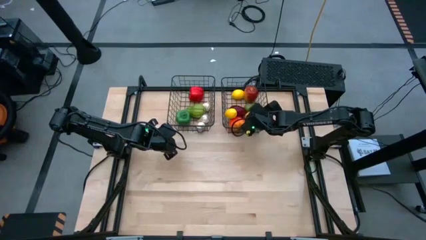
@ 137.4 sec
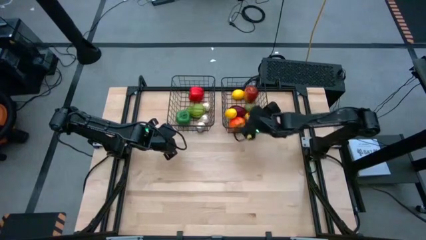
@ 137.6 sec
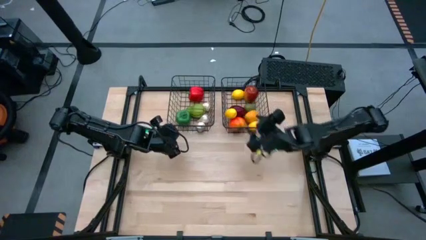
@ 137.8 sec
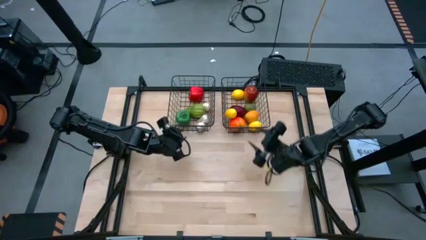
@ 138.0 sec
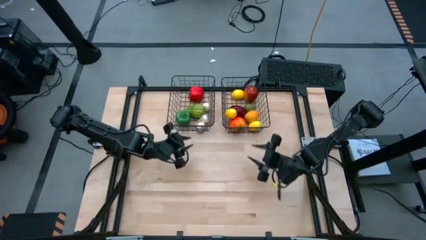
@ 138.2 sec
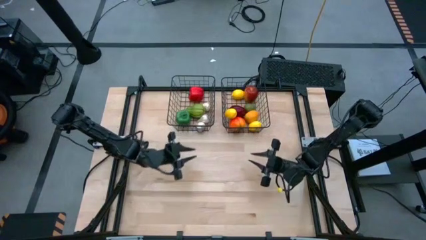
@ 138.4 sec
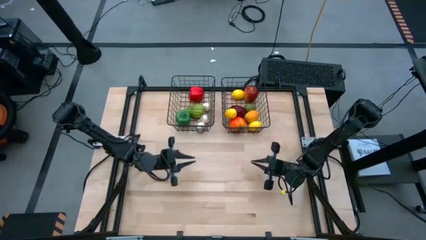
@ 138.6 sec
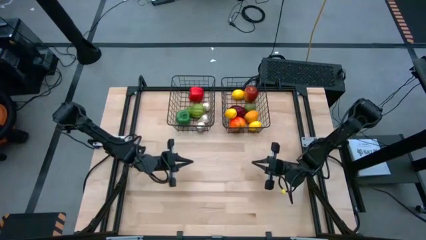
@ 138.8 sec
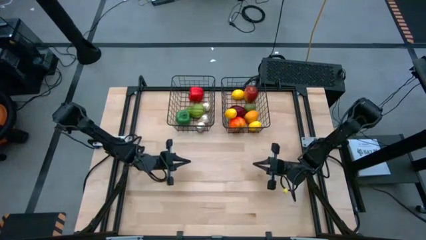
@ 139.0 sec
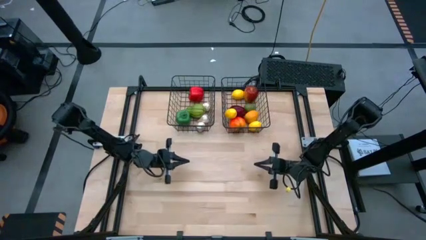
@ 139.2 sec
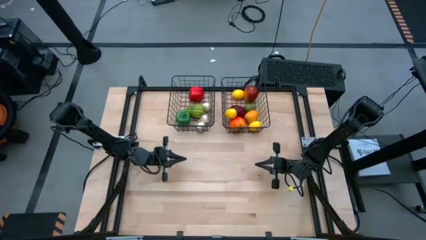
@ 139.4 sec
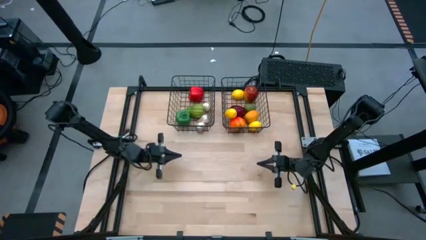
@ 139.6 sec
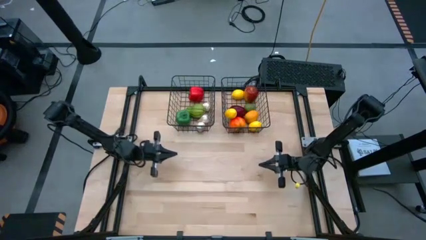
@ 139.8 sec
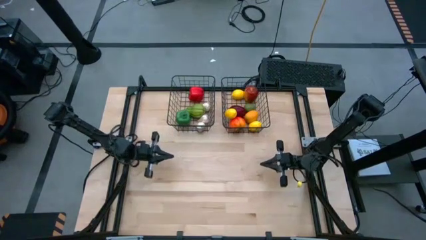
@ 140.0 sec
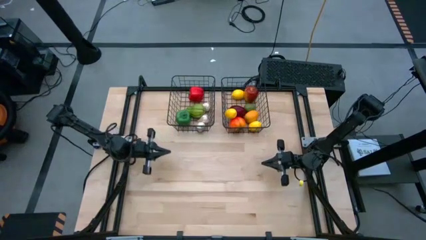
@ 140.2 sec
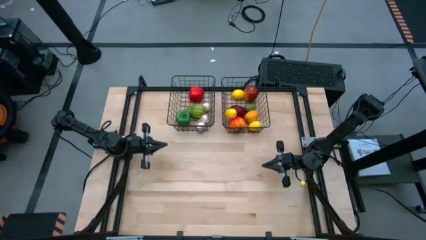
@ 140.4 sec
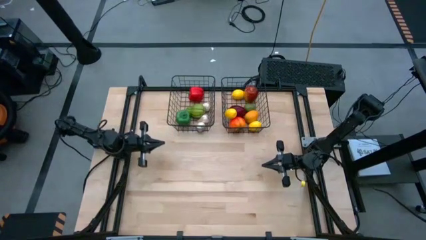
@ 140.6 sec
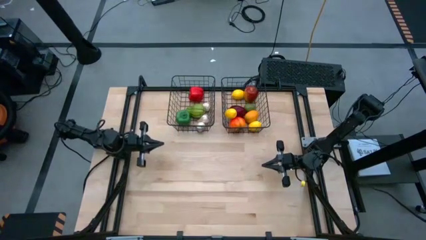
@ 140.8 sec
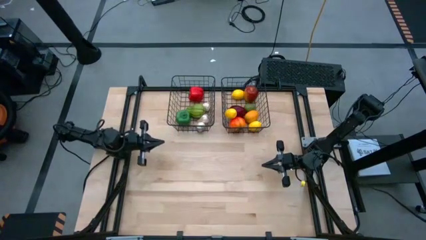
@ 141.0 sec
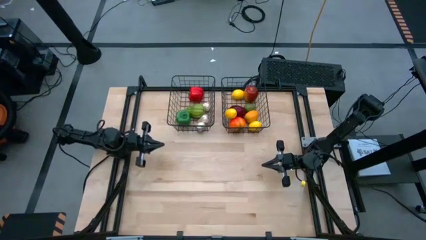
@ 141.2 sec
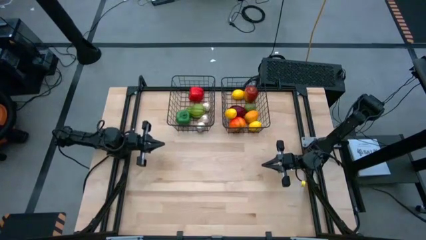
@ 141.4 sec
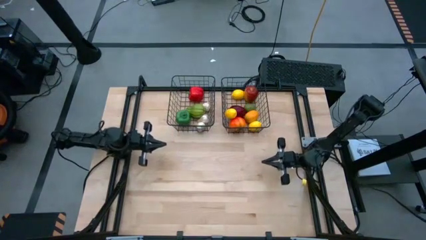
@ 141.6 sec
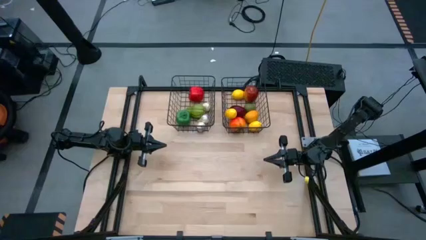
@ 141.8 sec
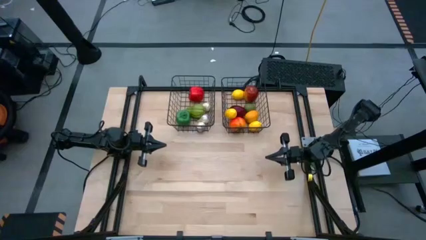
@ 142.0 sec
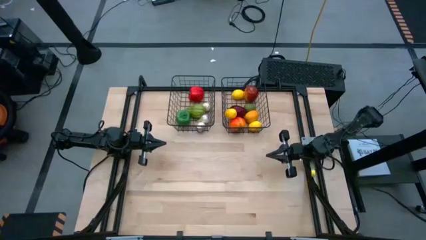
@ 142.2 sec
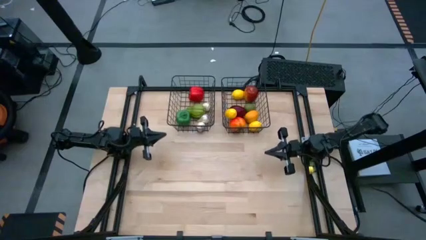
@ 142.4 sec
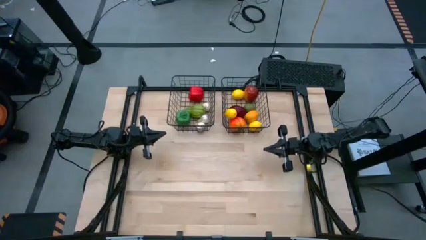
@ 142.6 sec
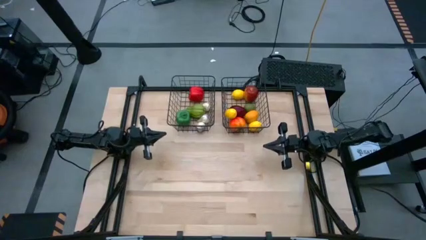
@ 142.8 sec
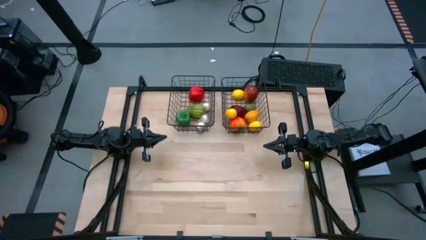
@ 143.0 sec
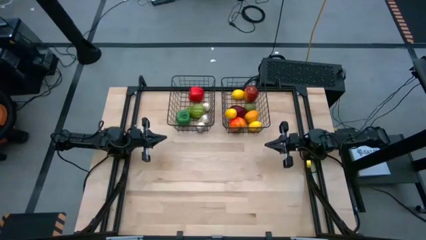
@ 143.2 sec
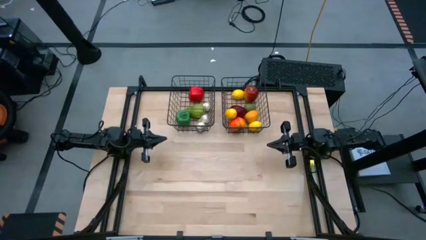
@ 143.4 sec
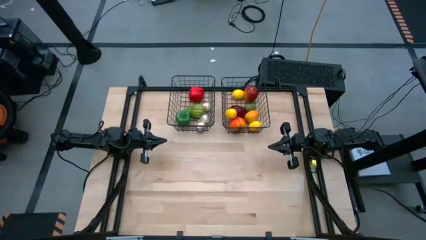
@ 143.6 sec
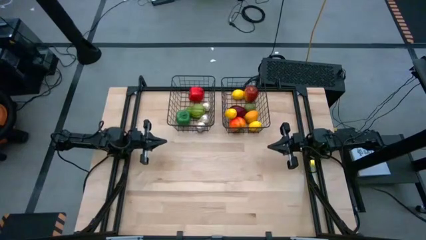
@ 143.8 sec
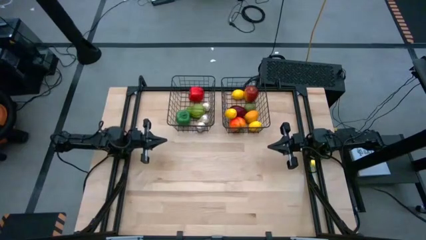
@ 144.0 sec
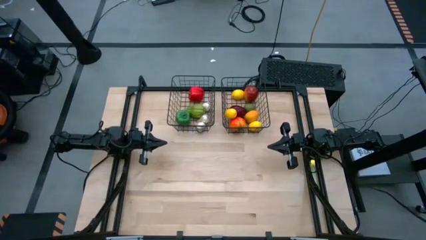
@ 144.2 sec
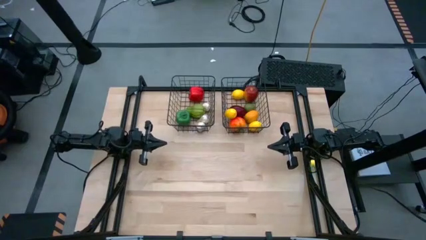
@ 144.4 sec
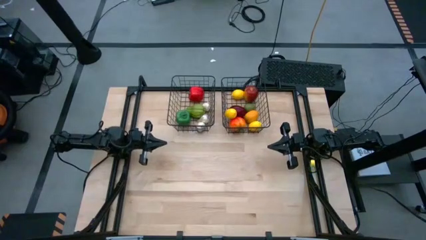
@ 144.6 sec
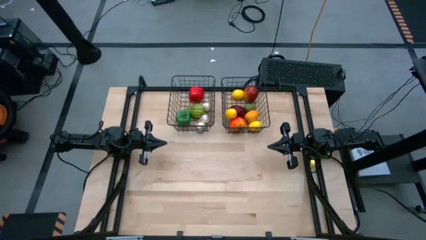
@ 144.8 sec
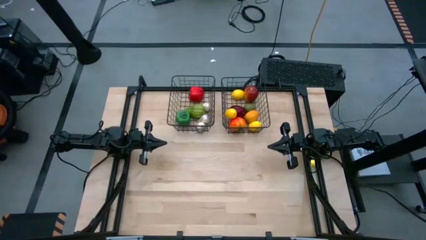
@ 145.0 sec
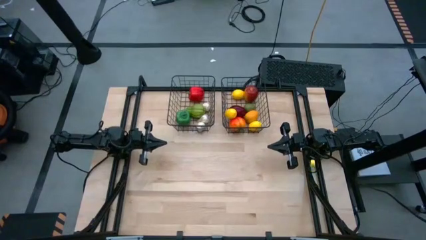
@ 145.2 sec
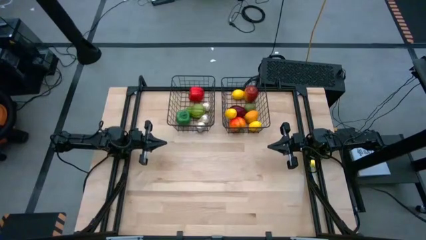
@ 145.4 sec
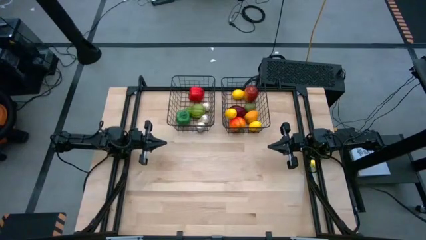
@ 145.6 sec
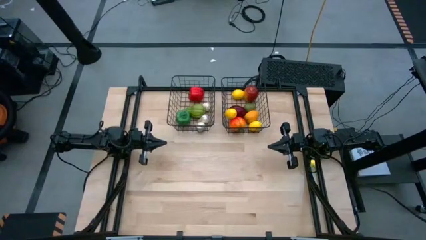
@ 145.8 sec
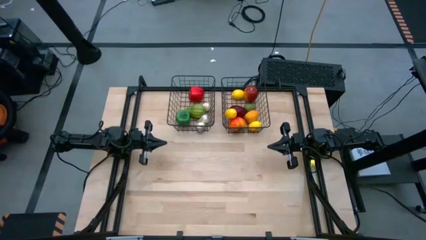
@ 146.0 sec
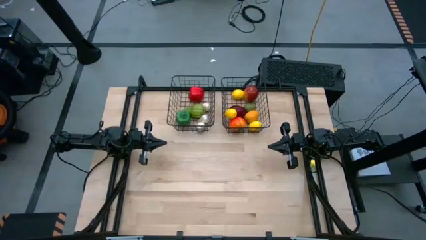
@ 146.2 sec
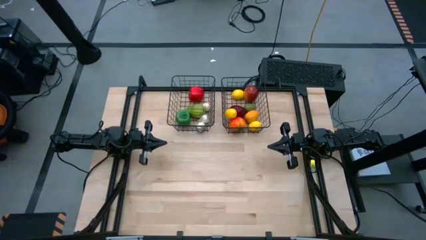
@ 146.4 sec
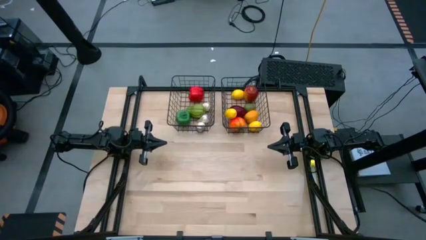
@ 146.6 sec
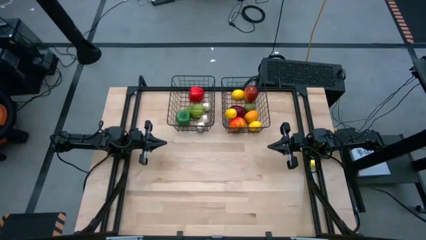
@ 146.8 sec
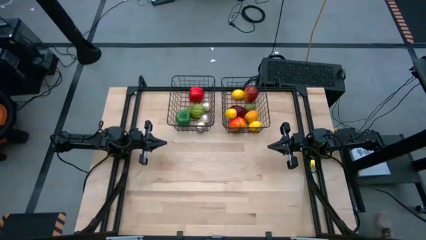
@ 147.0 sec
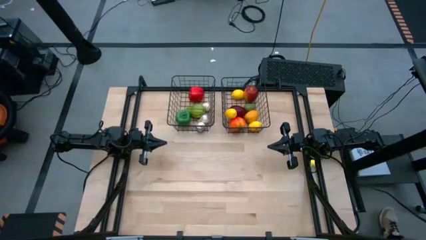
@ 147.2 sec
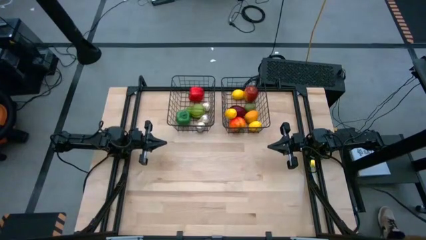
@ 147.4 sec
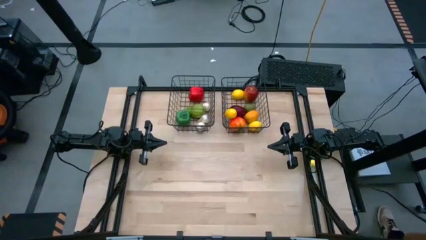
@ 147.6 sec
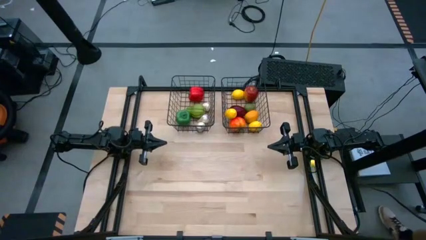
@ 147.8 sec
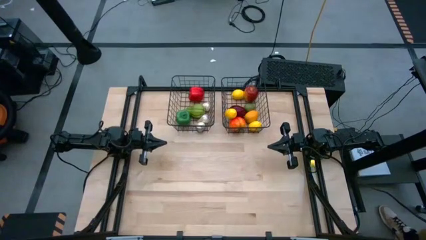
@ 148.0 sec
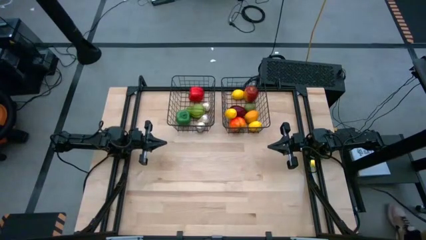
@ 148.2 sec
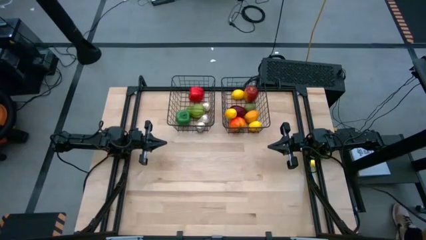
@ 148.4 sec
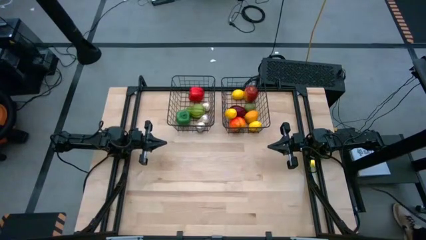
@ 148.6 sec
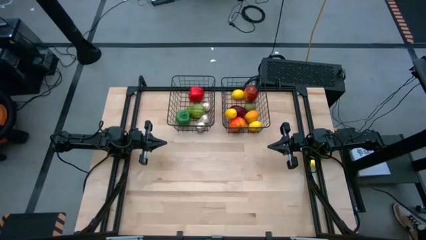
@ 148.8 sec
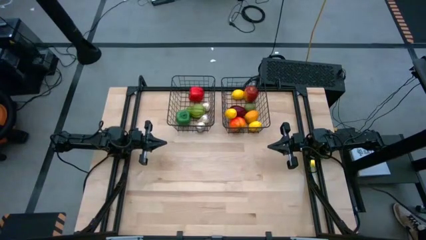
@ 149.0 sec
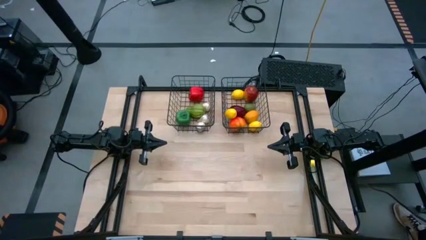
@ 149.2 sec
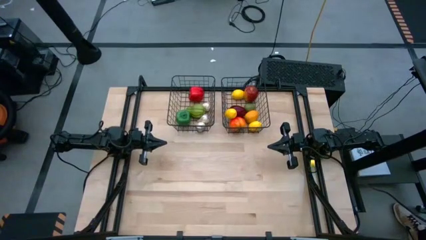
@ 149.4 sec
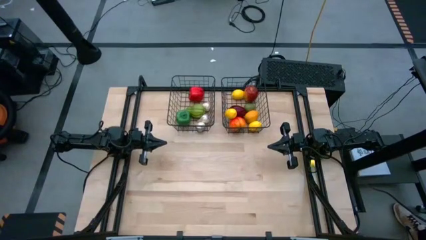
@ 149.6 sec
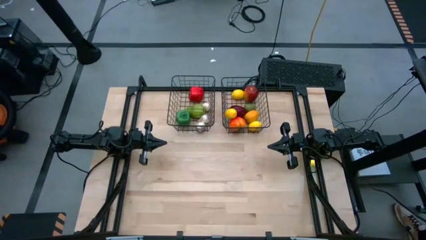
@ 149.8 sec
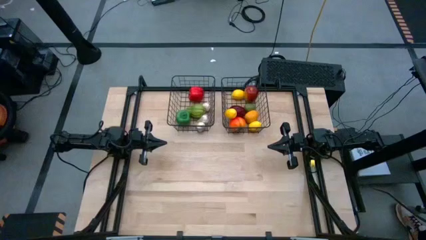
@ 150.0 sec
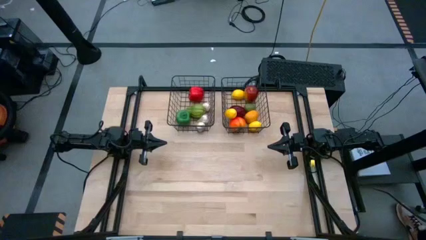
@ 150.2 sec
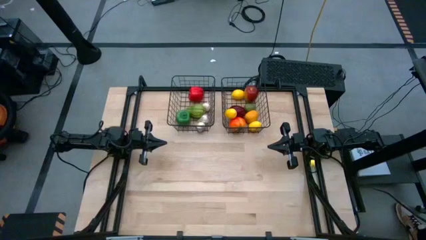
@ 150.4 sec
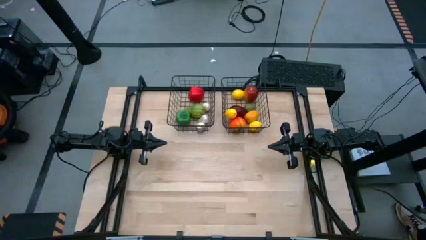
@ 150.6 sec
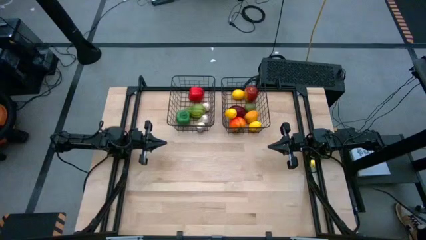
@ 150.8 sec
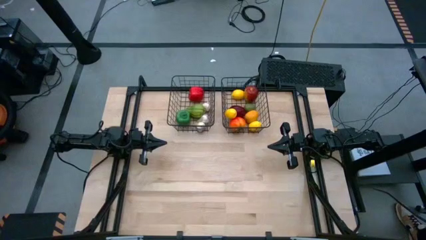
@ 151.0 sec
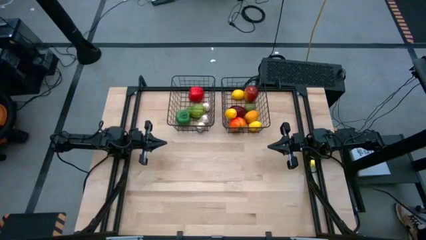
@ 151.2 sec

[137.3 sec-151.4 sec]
Task: Sort produce into baskets
Return to Home Position
